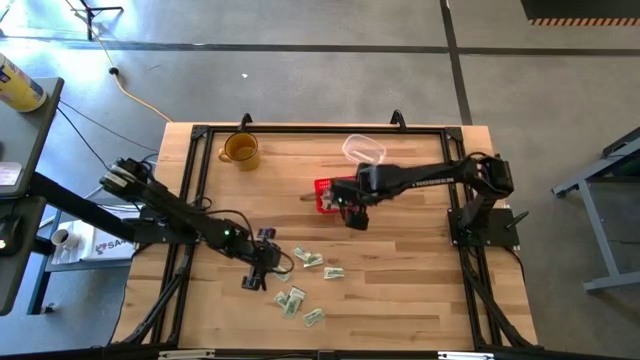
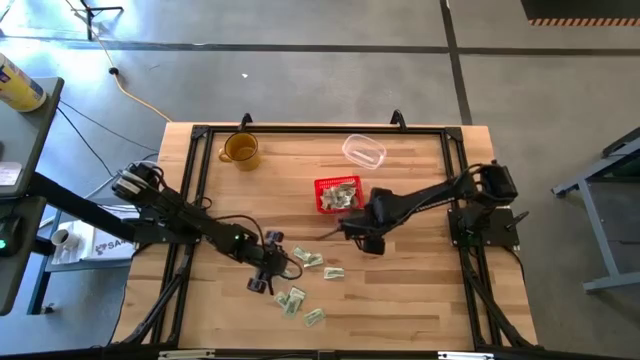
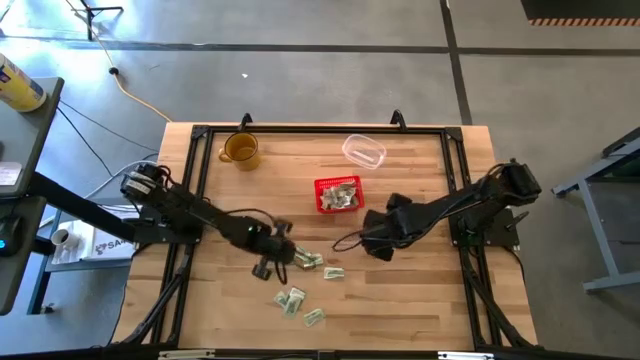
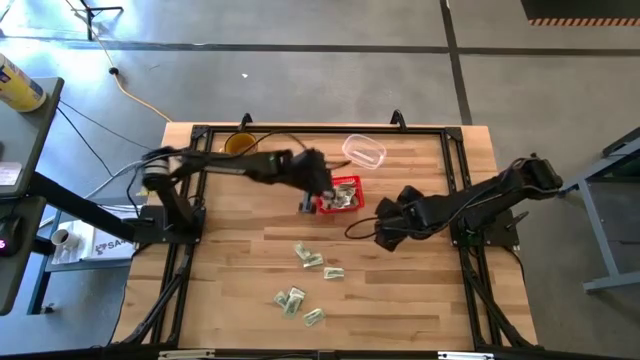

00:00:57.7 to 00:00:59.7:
Task: Pick and place items into bin
Put the white packet into the red basket

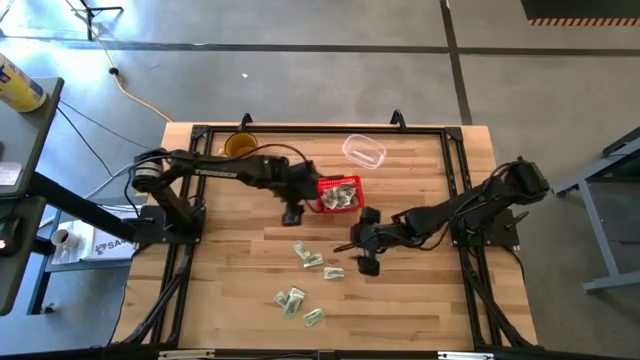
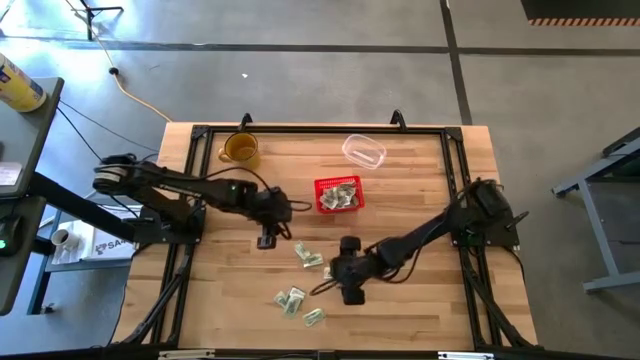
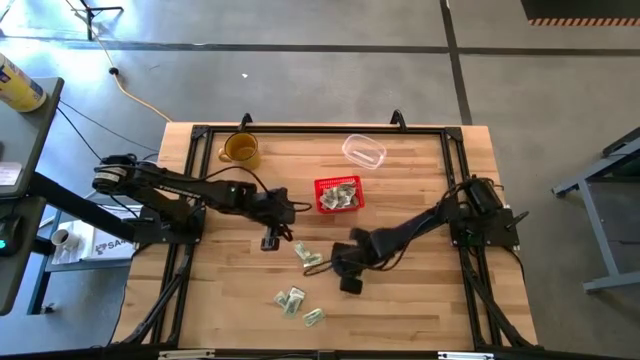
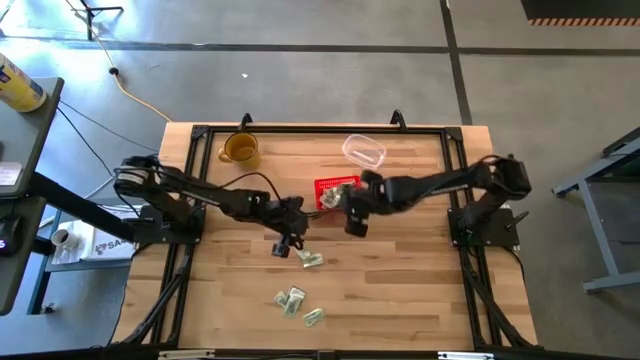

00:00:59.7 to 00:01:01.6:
Put the white packet into the red basket

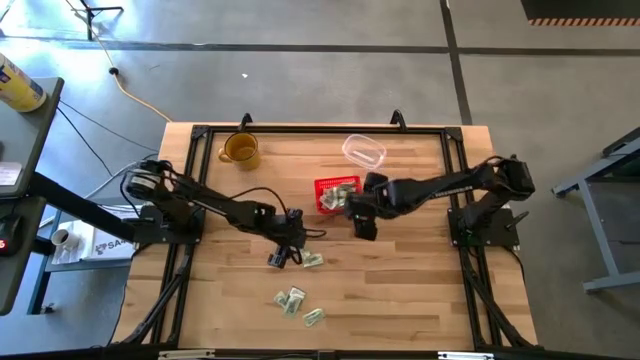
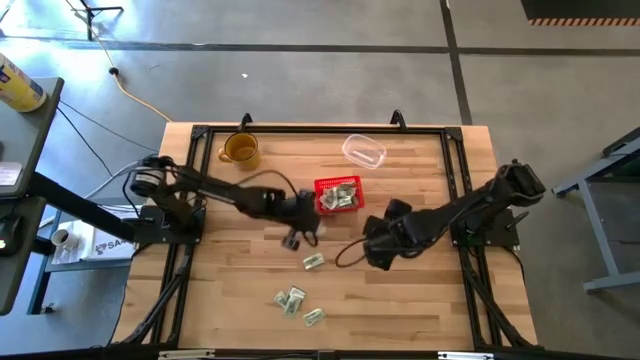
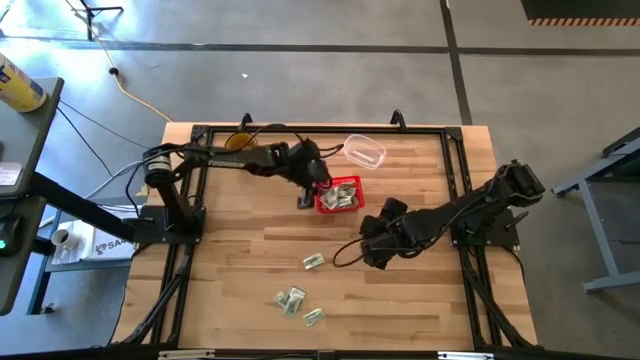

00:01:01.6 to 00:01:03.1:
Put the white packet into the red basket

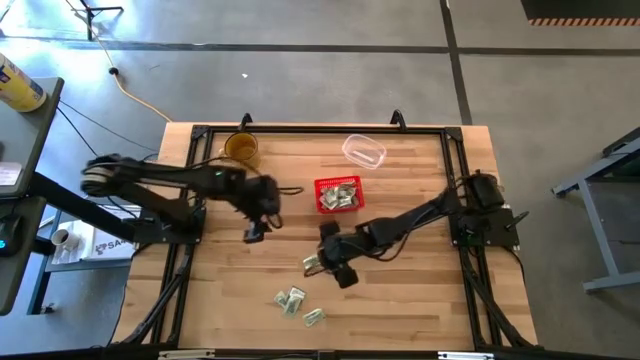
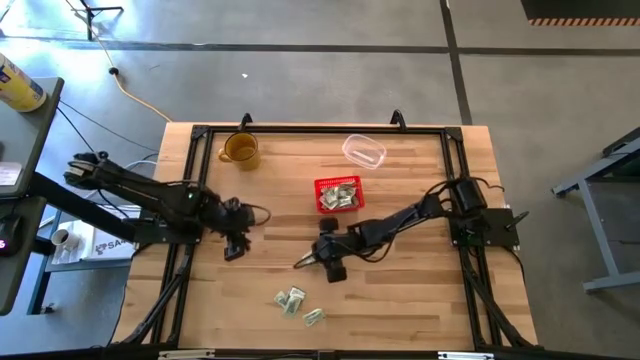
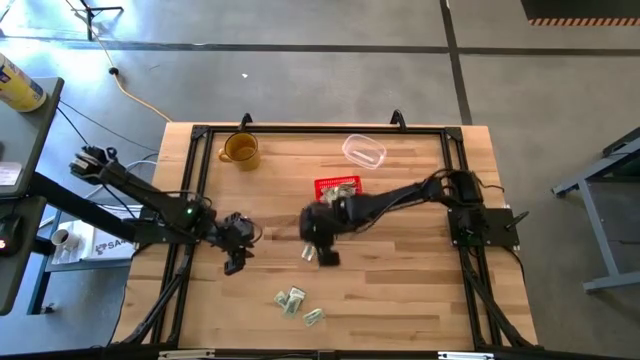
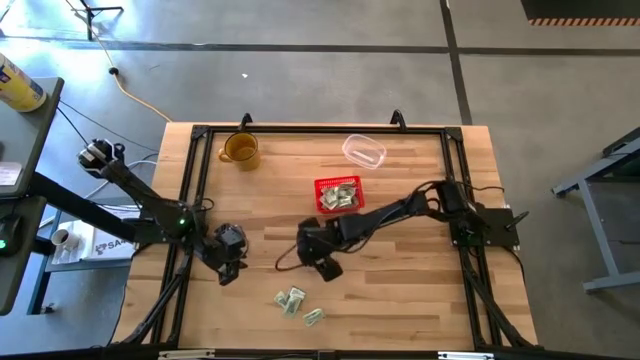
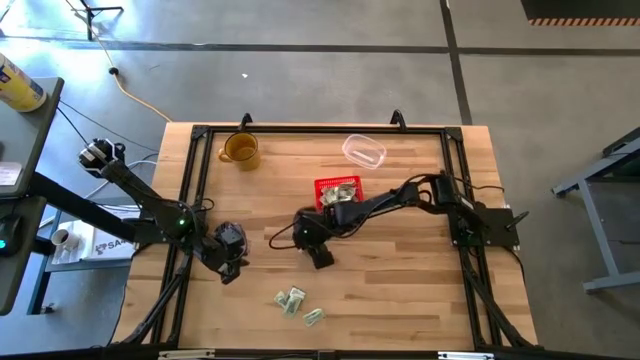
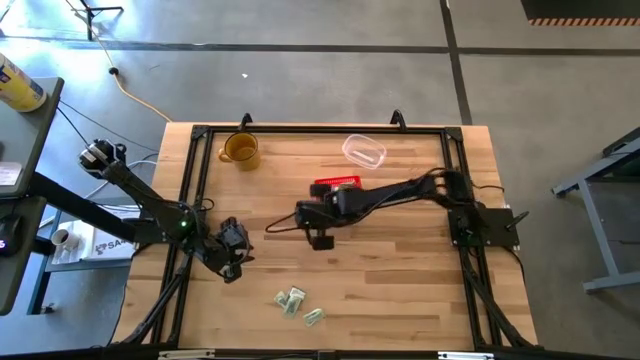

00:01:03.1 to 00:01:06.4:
Put the white packet into the red basket

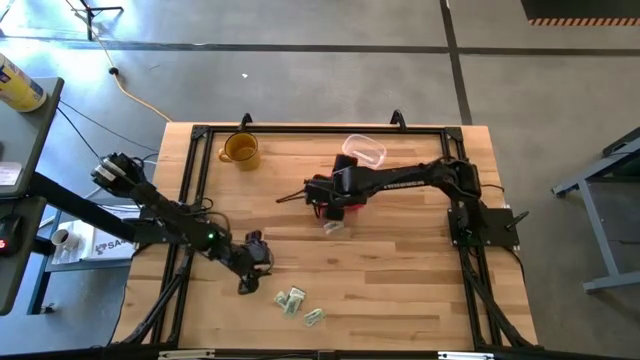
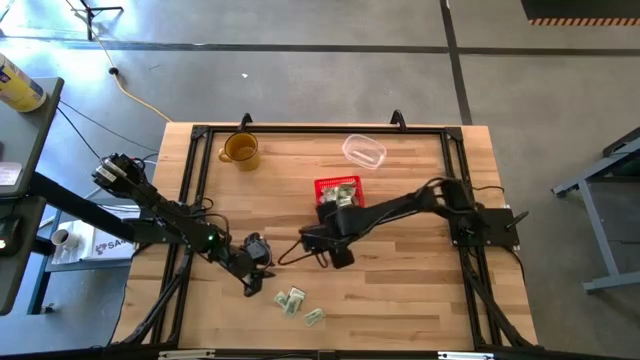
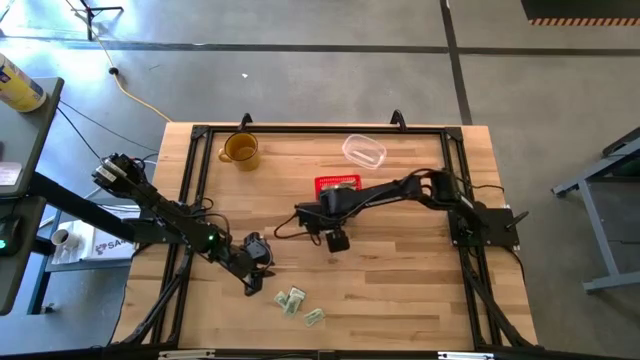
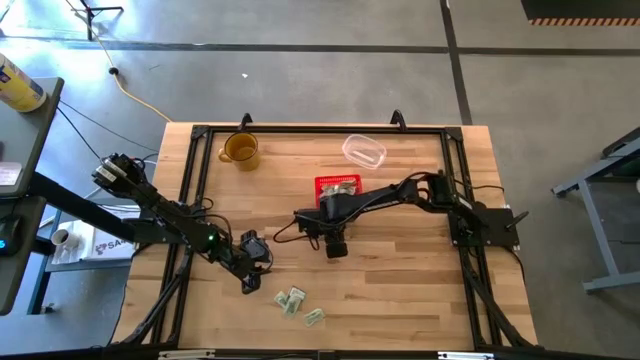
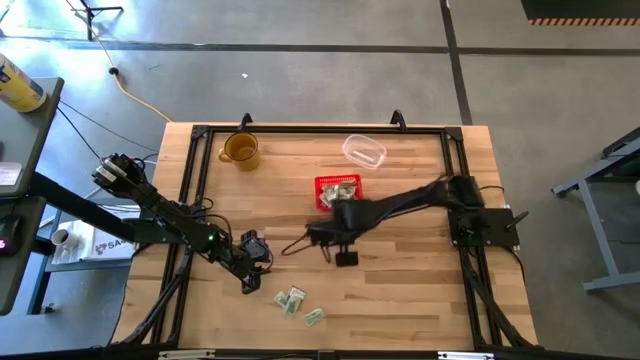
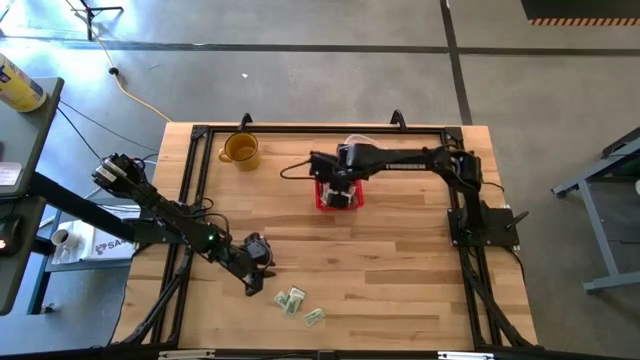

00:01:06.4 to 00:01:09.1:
Put the white packet into the red basket

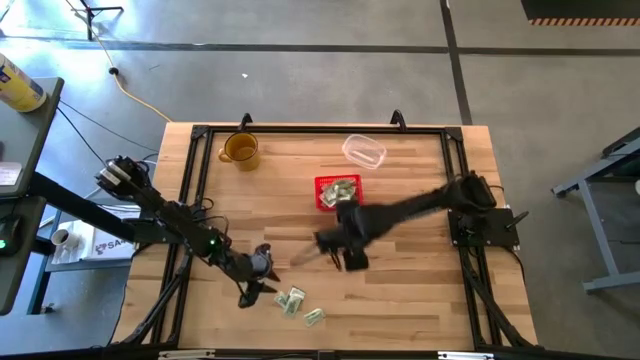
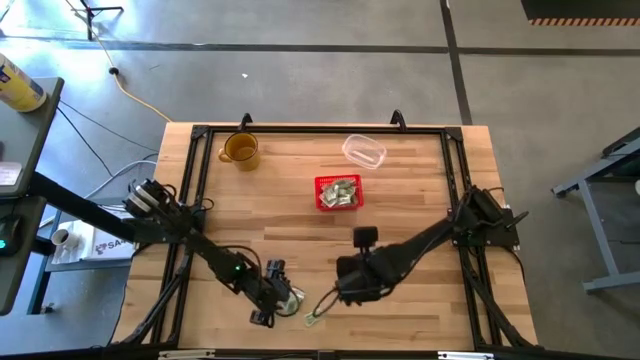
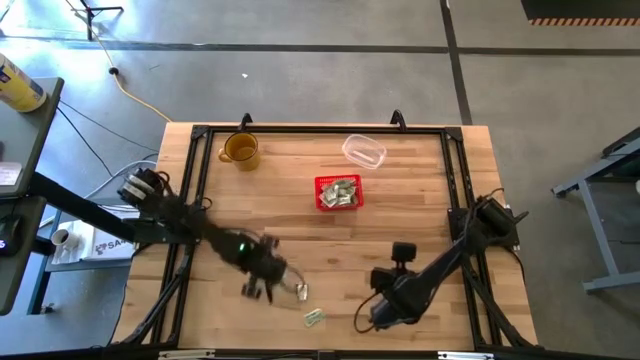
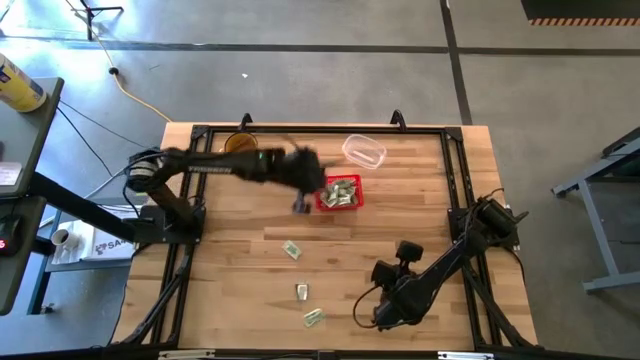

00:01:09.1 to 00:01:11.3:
Put the white packet into the red basket

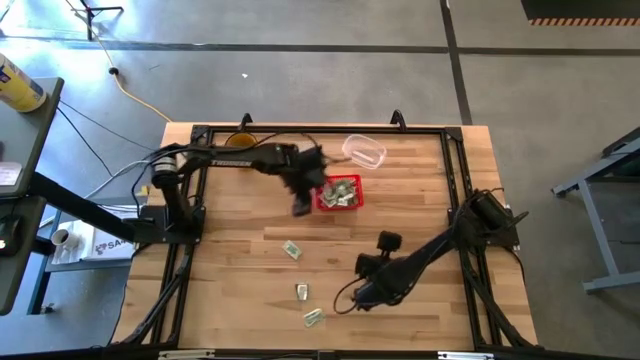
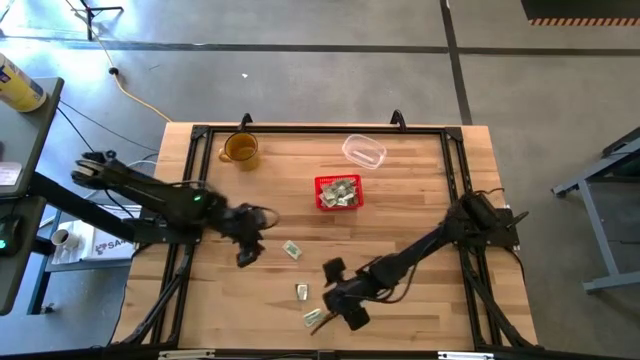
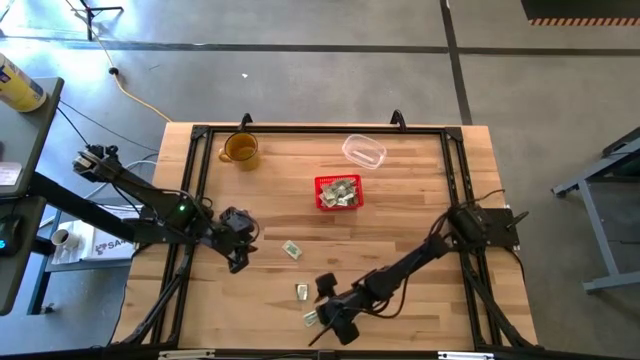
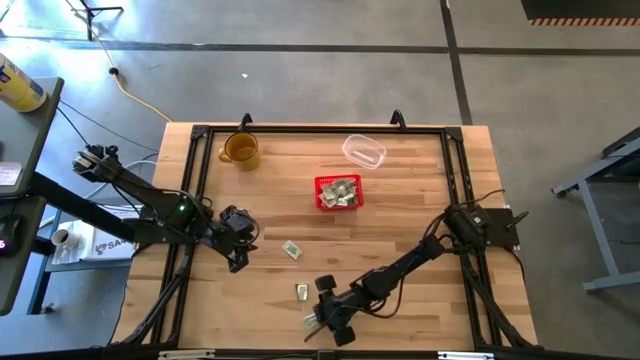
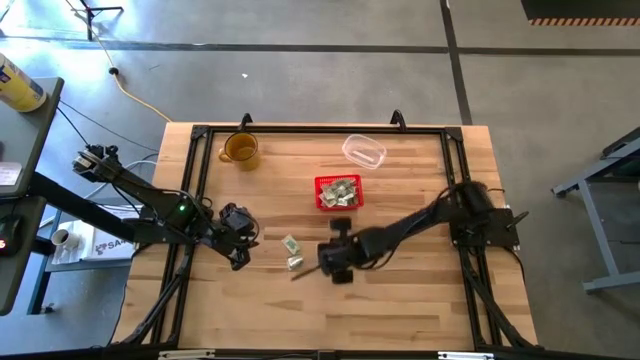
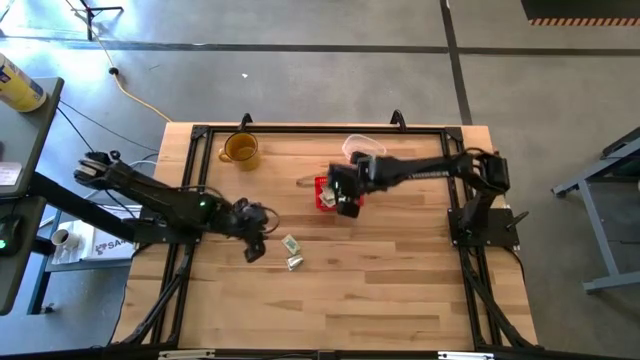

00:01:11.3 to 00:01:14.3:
Put the white packet into the red basket

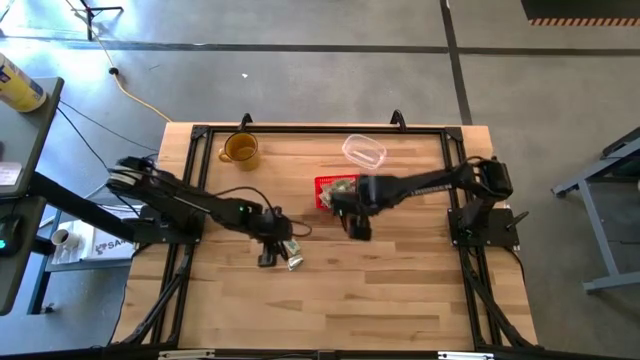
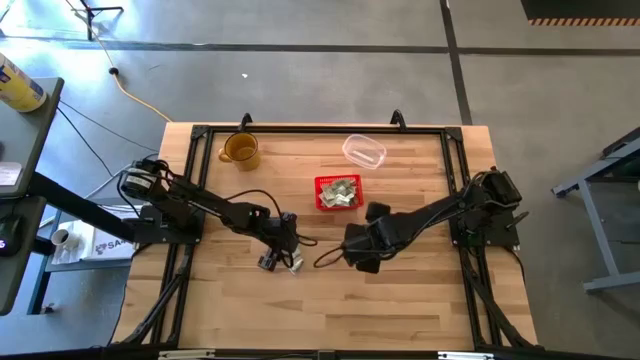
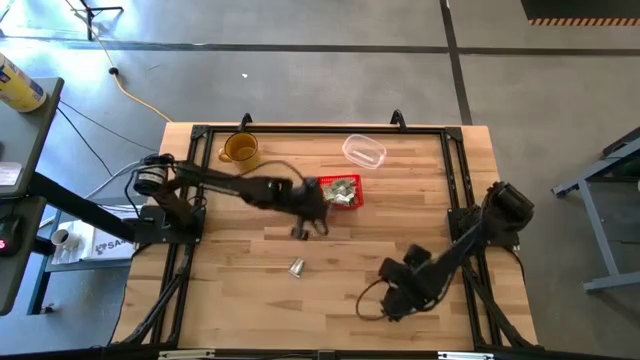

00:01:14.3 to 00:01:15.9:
Put the white packet into the red basket

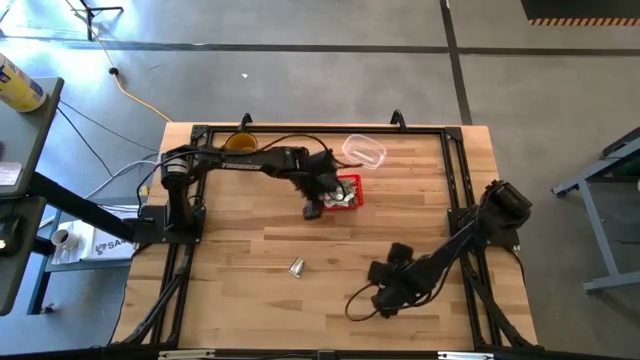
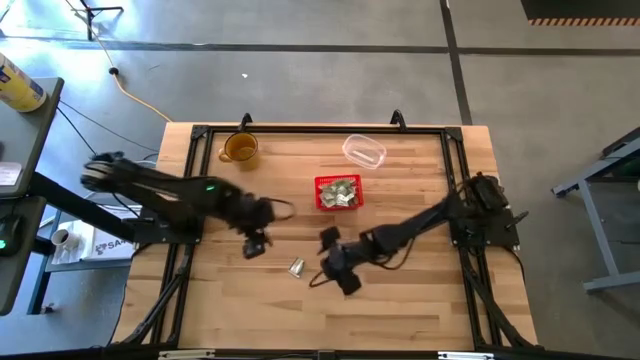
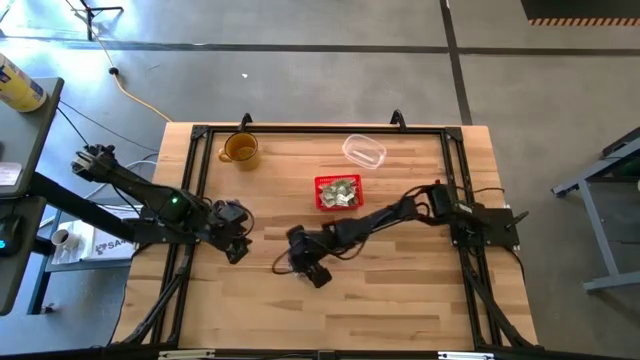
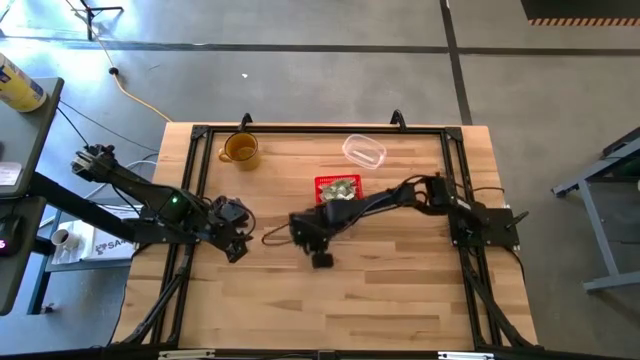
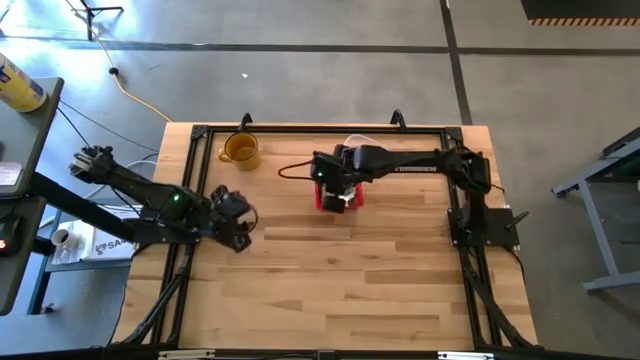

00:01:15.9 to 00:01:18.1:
Put the green packet into the red basket

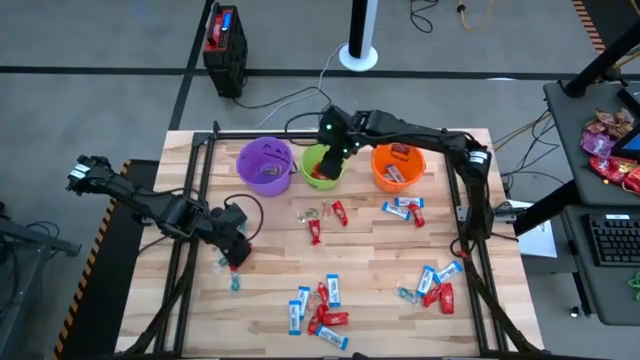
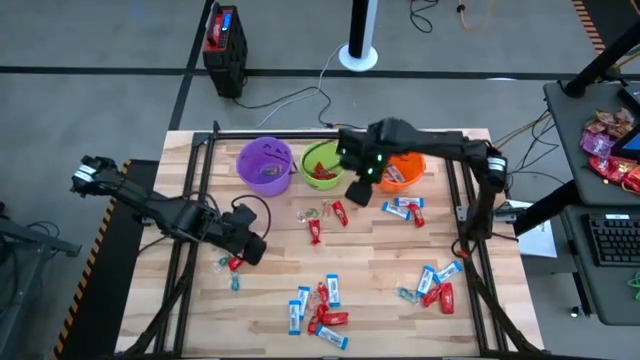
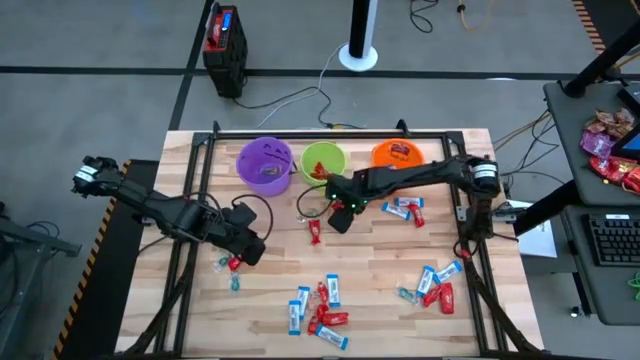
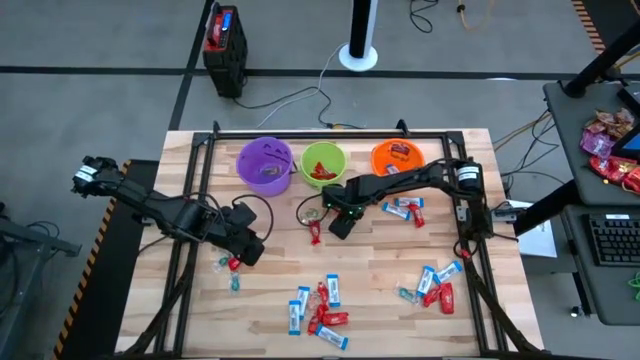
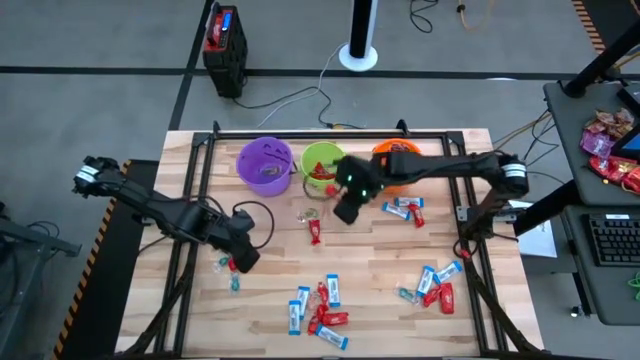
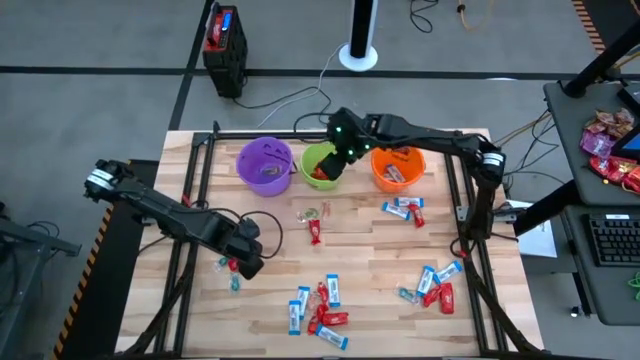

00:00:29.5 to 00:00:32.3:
Task: Sort candy by brand, put in halloween buckets
Put the red chocolate bar into the green bucket
